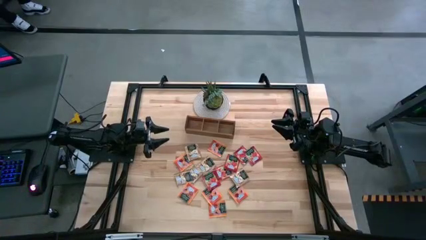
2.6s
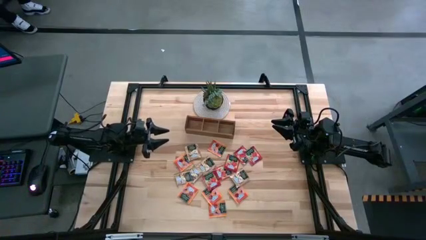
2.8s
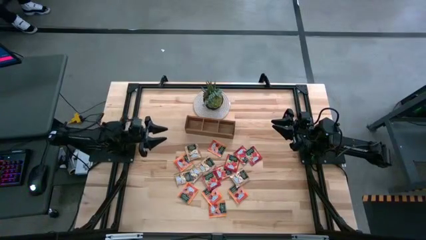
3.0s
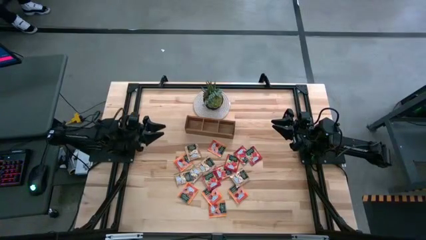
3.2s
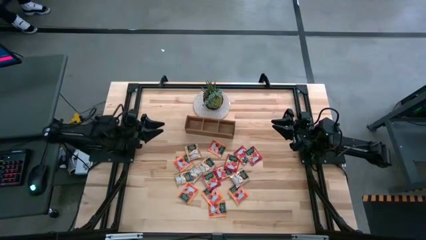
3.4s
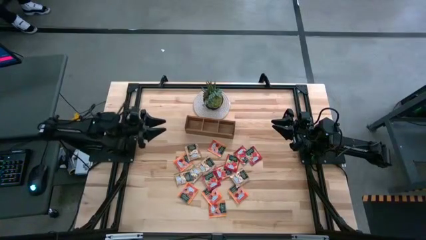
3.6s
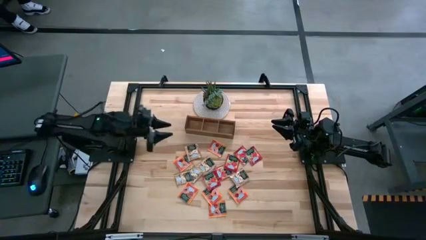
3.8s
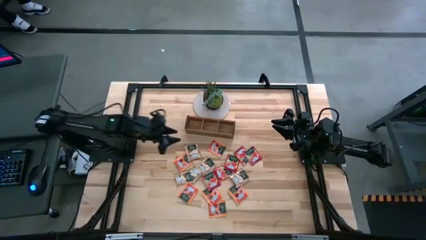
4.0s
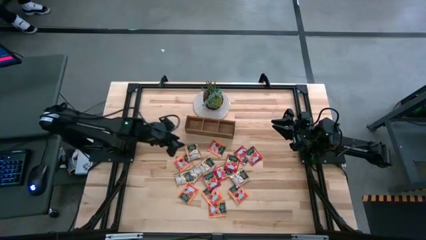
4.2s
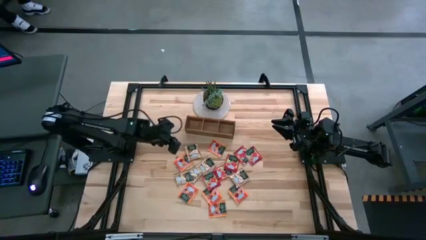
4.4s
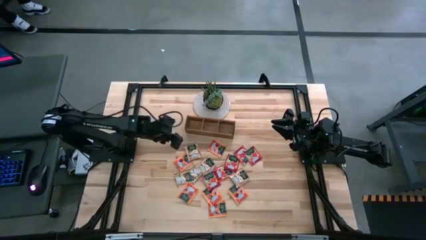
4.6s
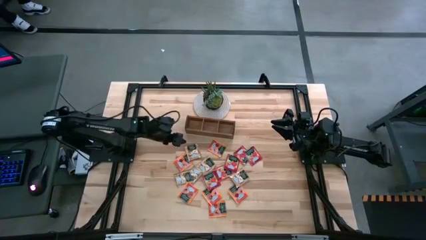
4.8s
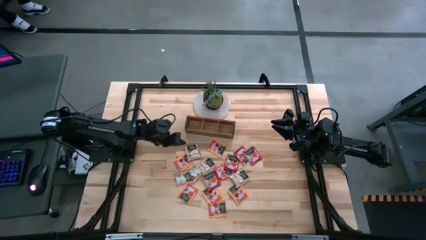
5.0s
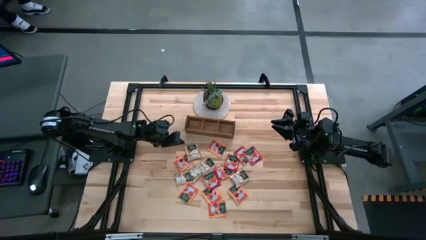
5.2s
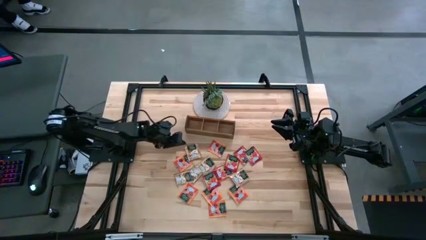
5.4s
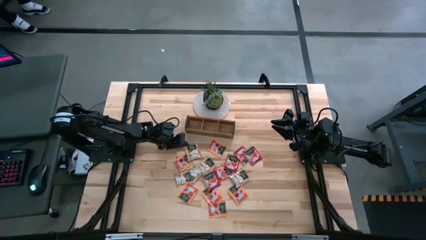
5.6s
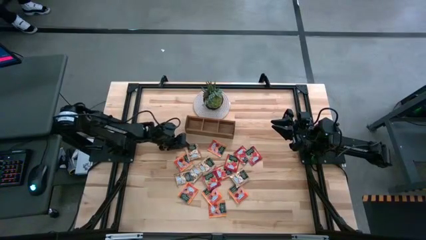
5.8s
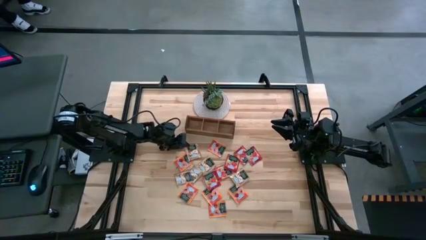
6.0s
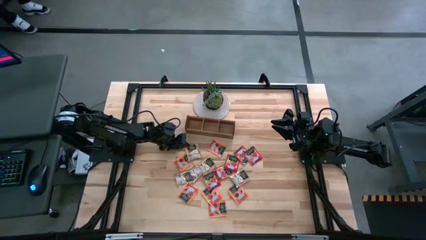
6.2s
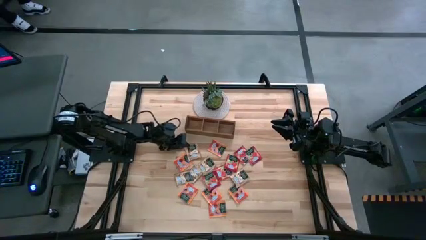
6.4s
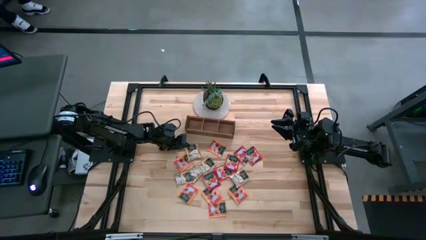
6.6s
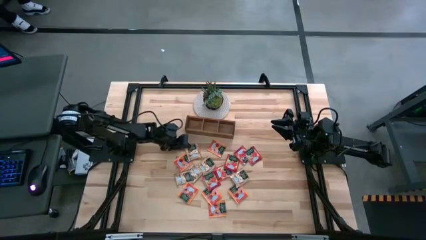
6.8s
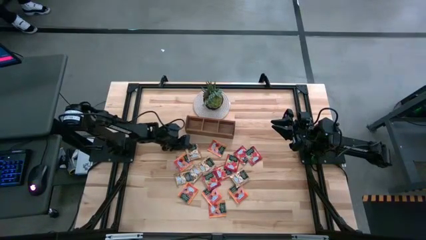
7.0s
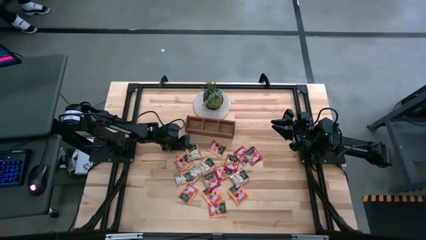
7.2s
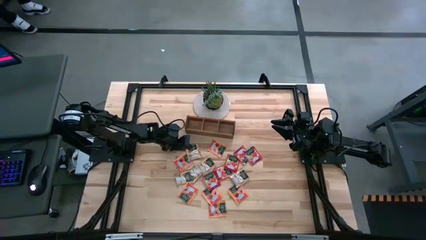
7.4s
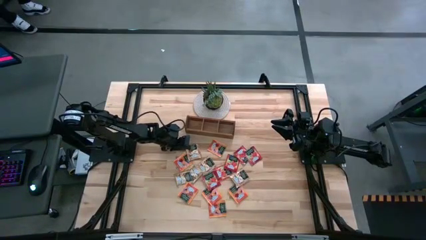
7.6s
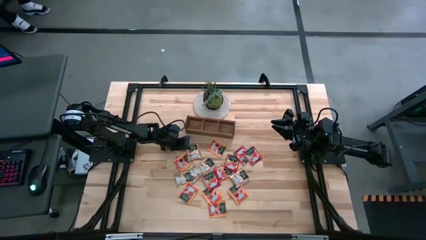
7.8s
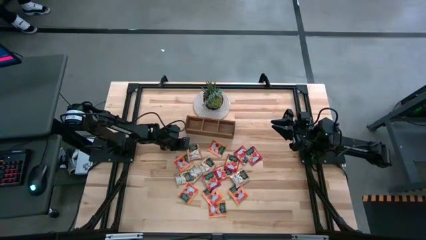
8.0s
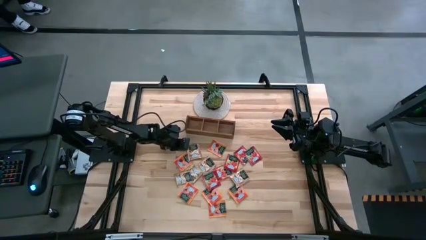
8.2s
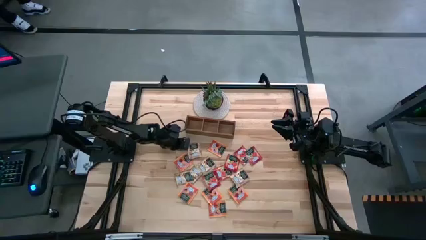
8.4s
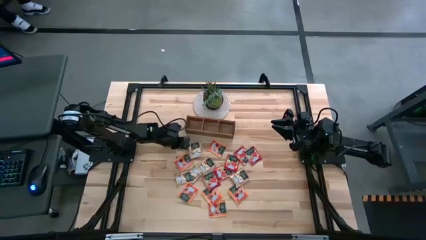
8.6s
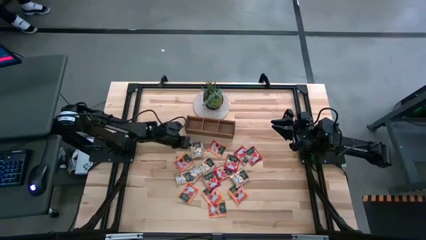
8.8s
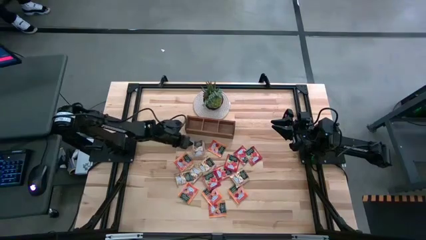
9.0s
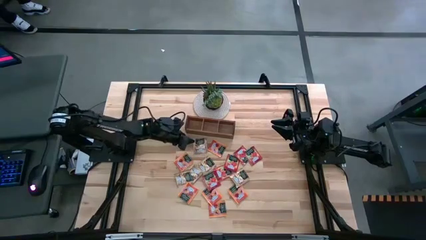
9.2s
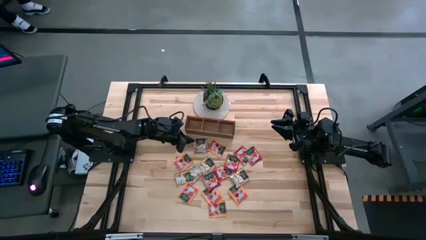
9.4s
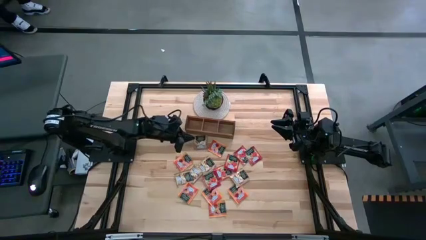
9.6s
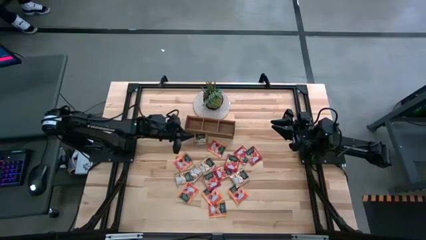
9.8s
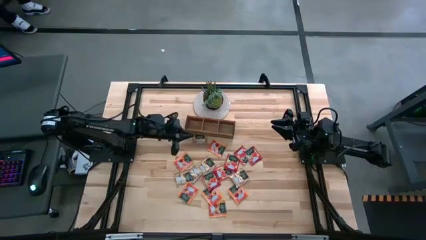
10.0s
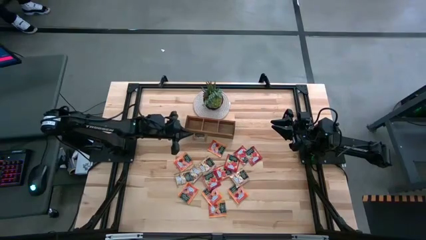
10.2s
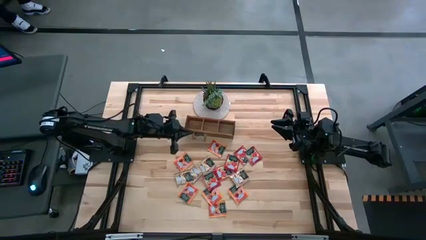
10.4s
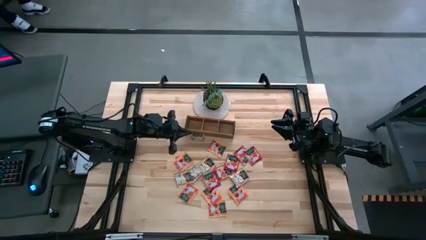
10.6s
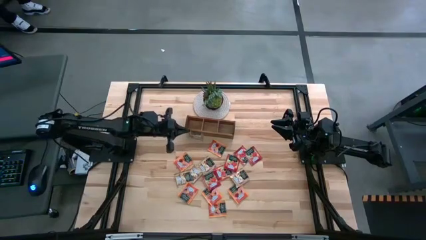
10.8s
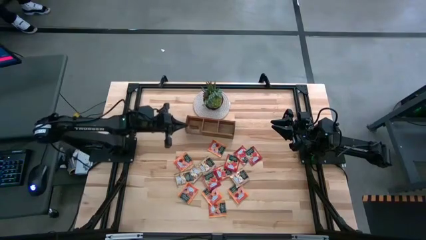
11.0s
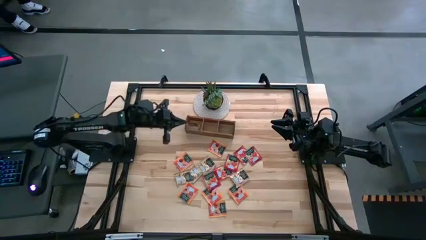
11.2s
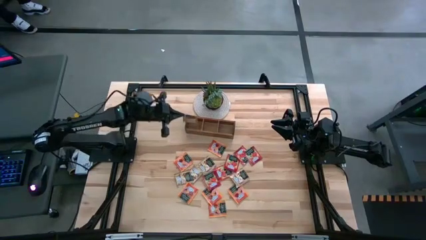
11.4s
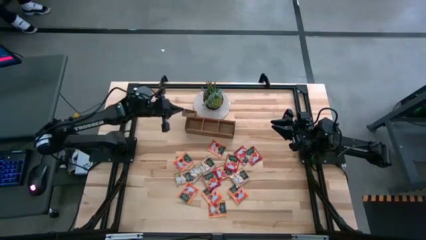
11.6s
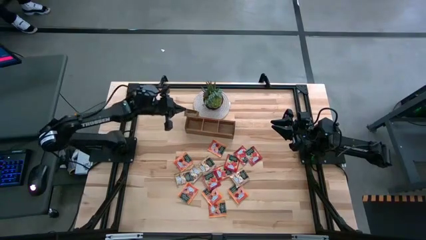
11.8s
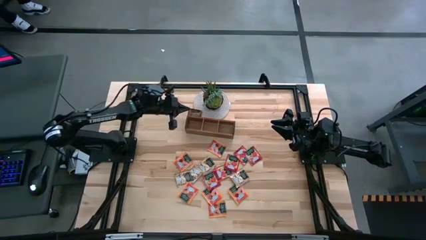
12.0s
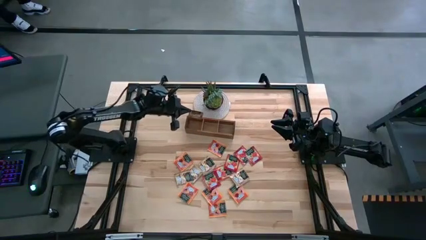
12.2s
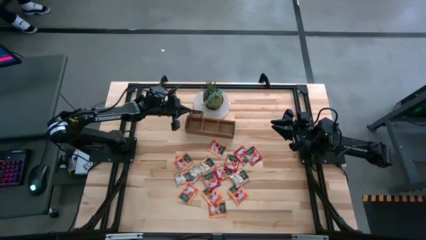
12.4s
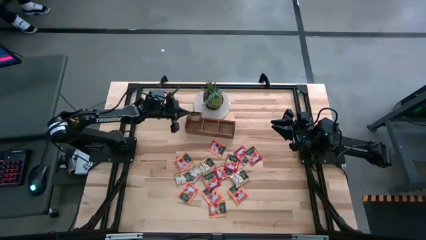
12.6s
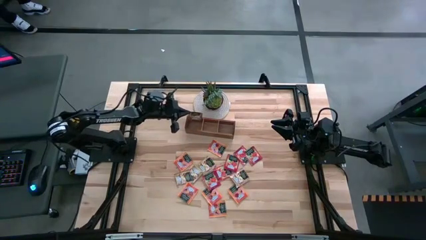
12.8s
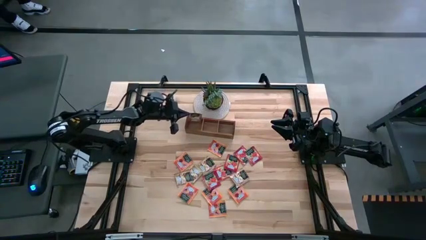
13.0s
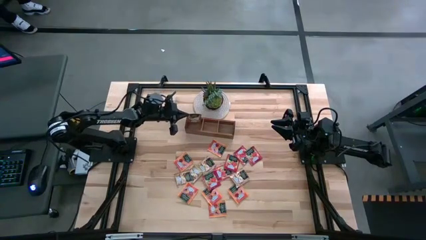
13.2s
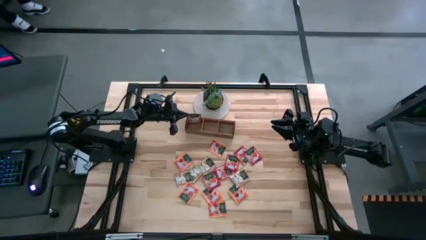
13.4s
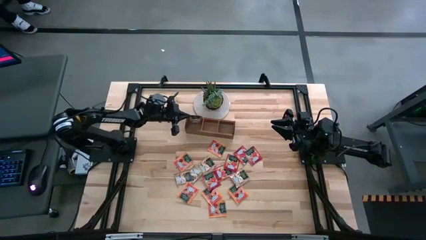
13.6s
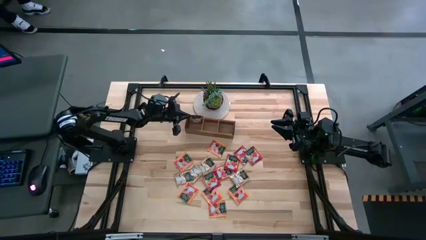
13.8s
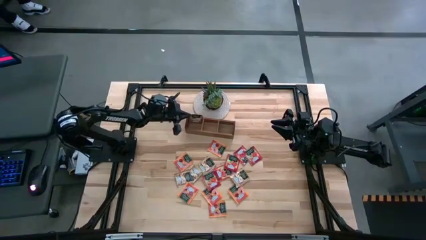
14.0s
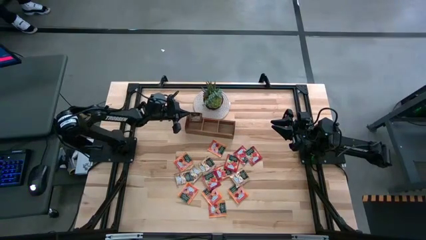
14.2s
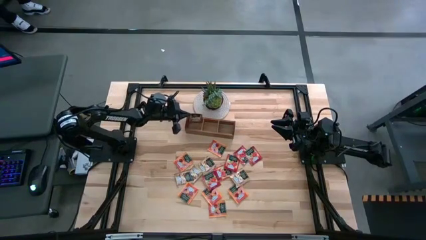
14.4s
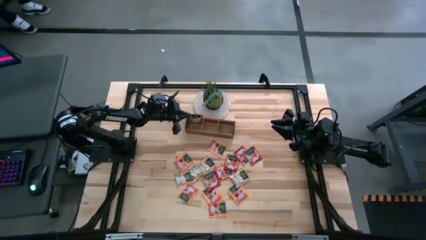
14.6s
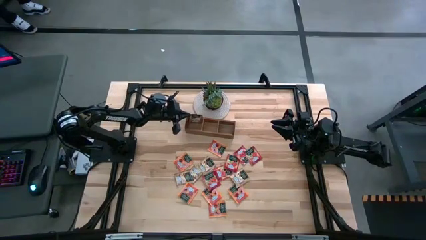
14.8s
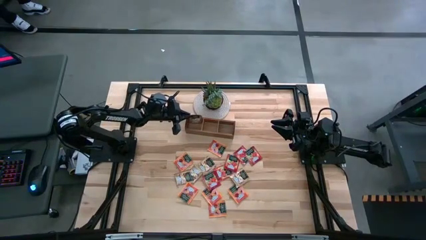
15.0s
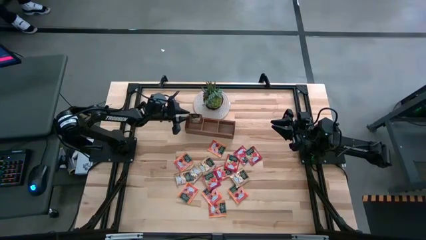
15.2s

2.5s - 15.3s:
Task: Pick & Place Tea
Put the brown tea bag into the left section of the wooden organizer
